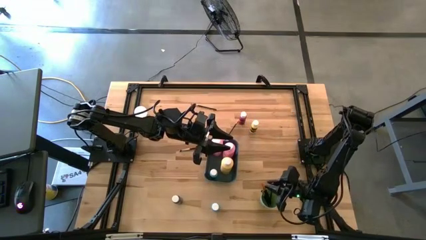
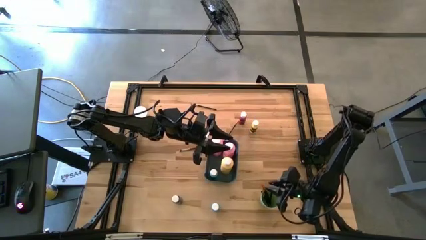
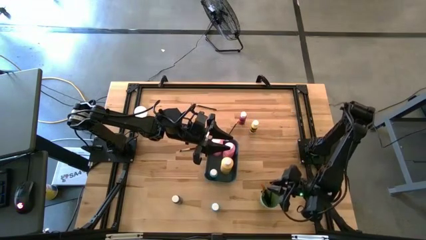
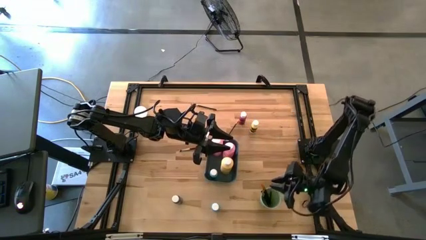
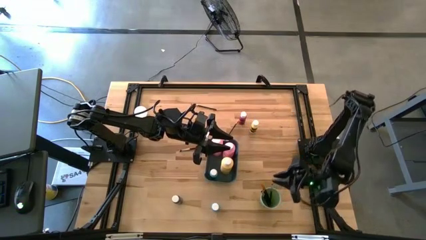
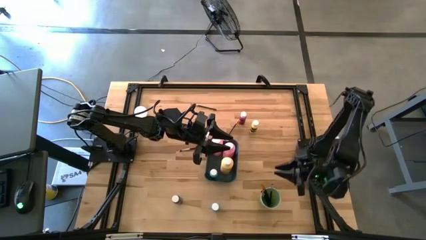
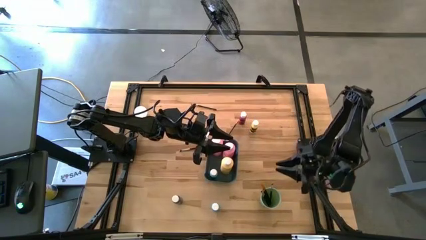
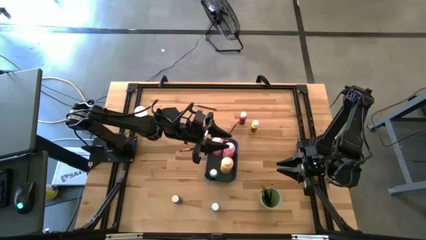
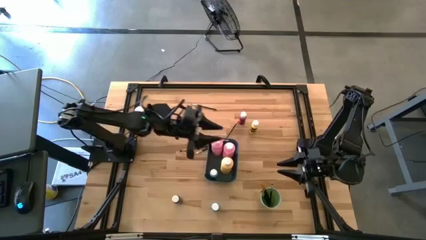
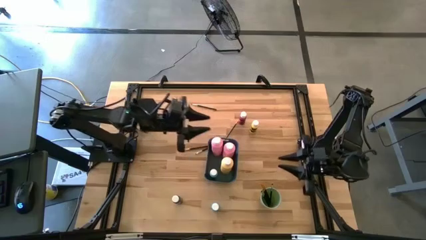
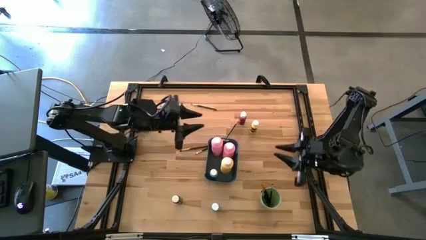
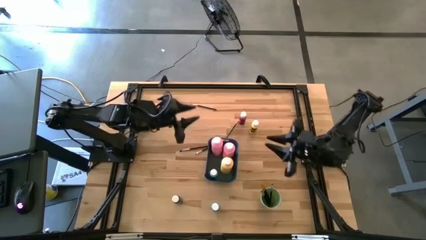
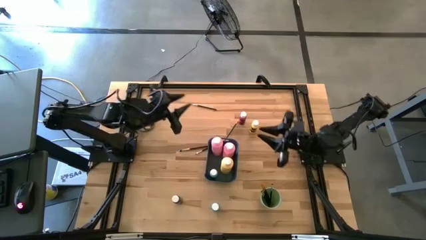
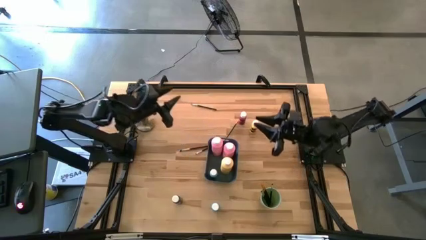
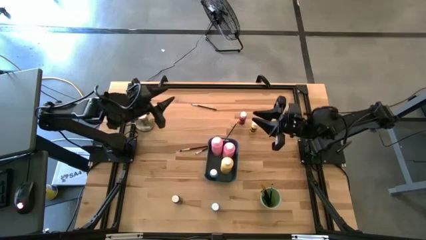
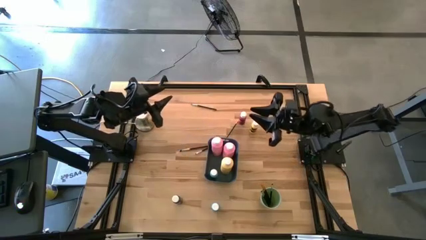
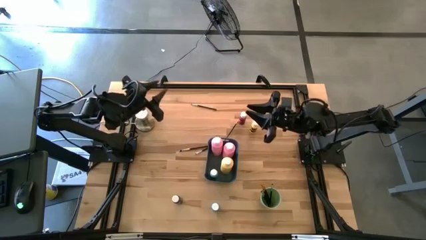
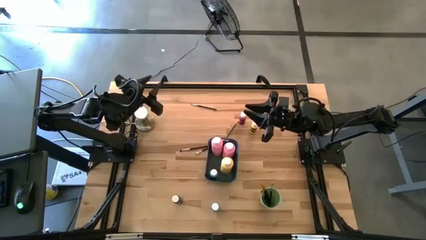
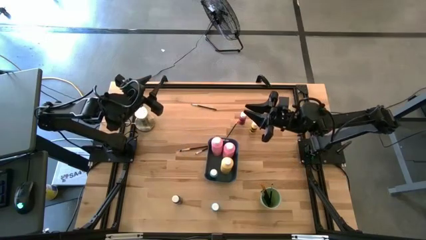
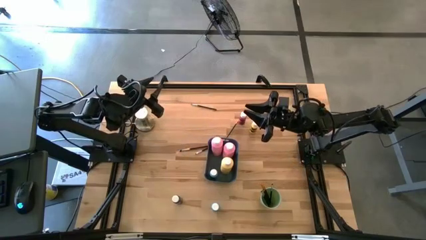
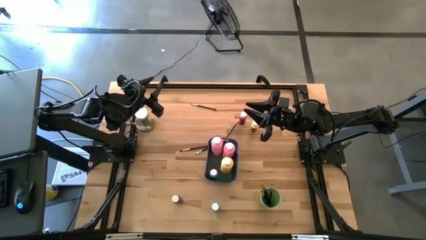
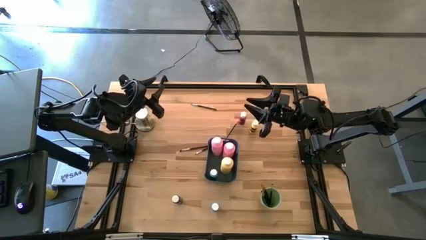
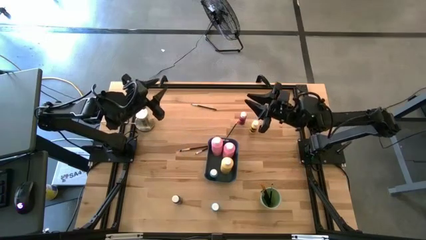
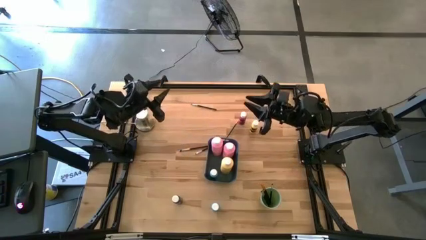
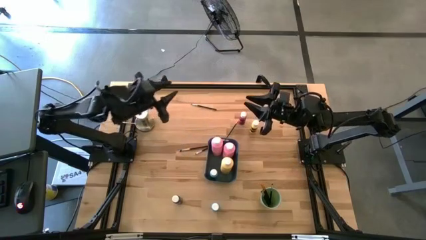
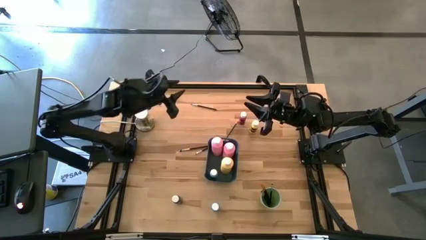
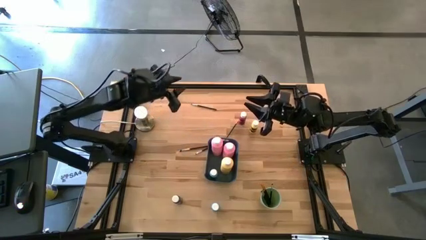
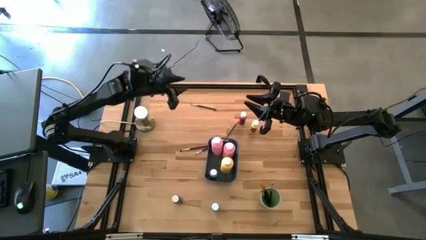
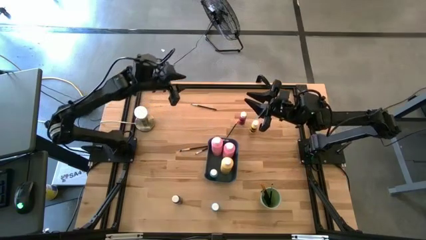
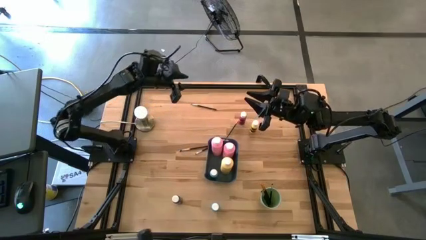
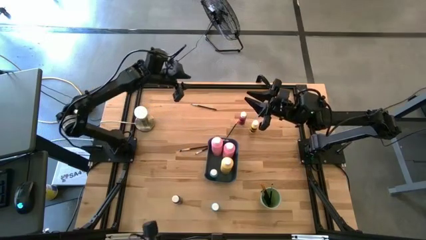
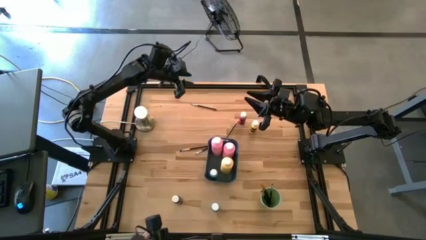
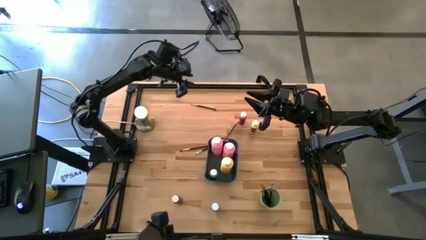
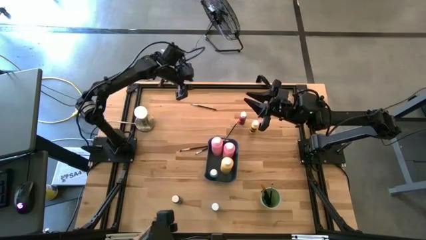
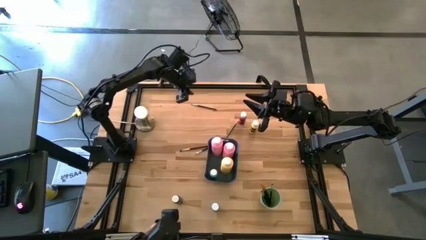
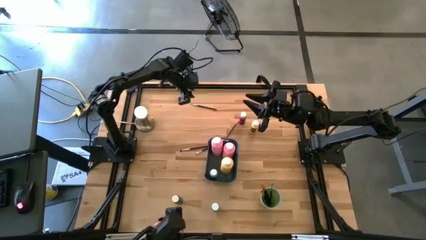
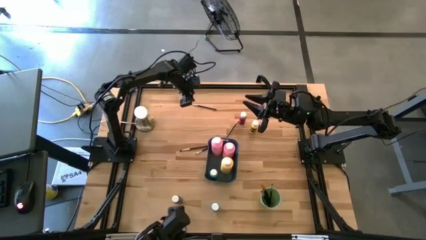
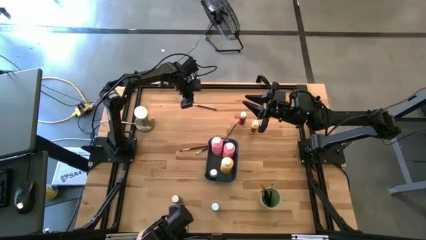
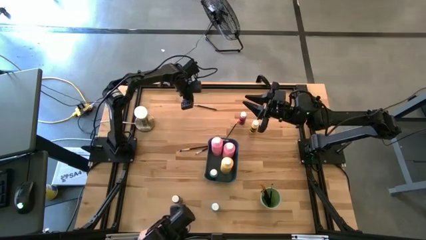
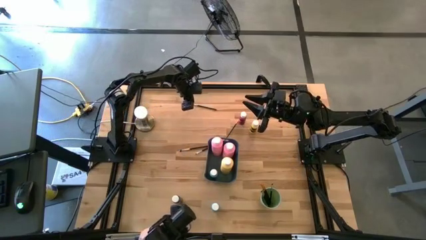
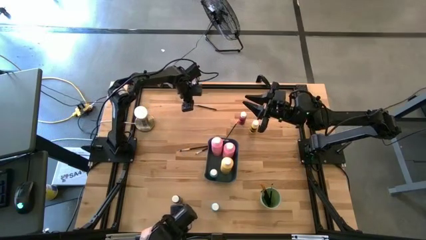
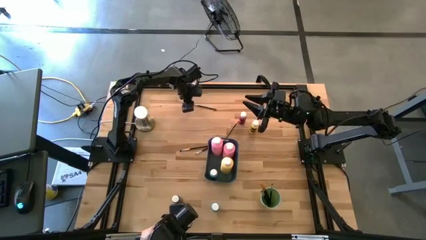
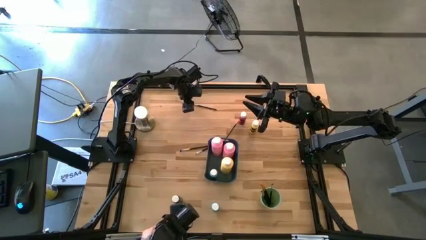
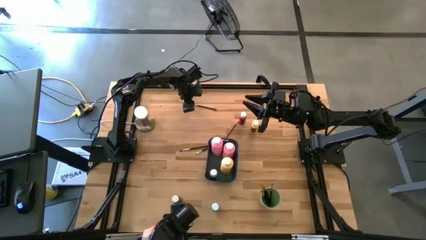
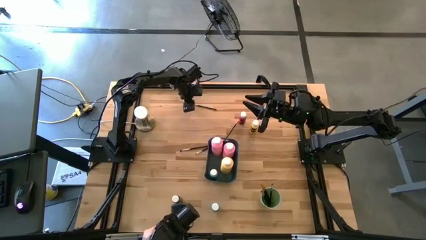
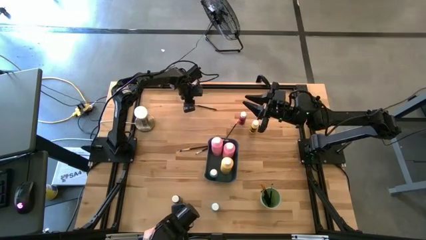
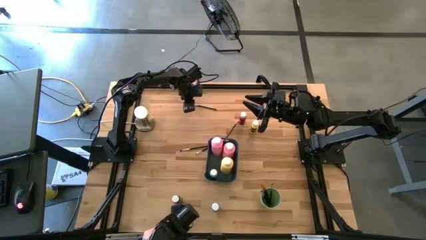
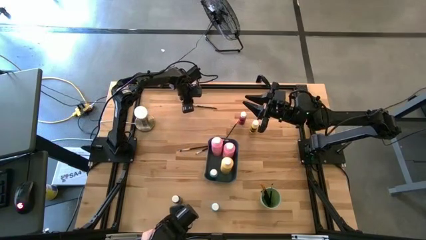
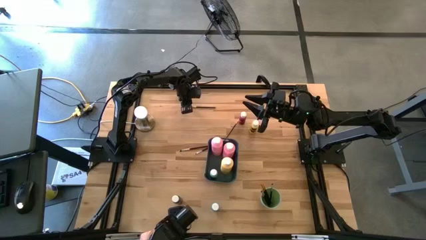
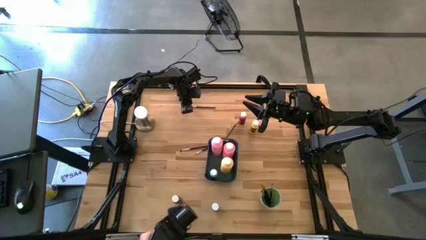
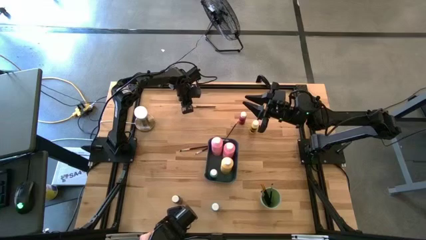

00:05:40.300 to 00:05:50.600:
Task: Pick & Place Paint Supplies
Put the black and silver paint brush into the green cup

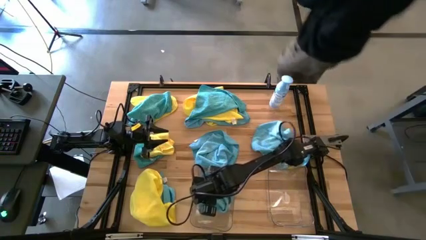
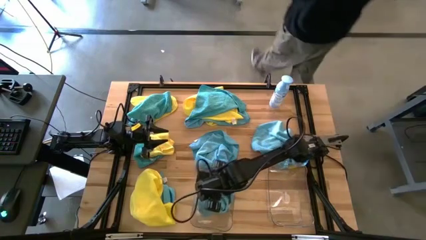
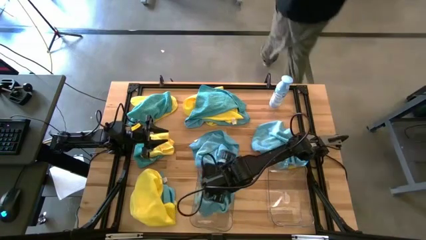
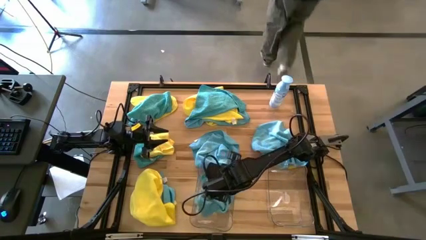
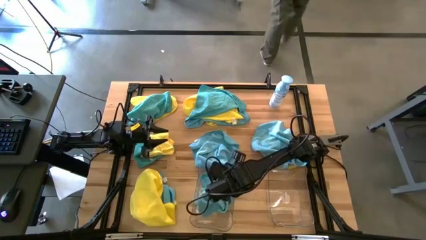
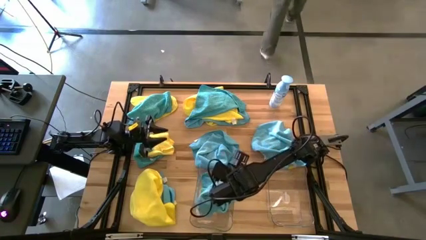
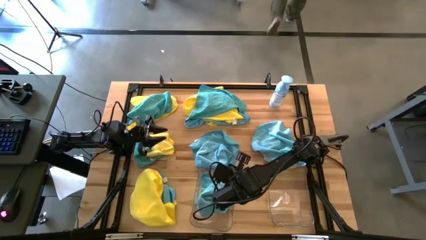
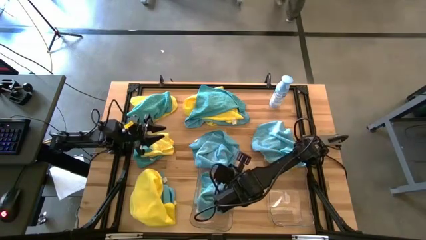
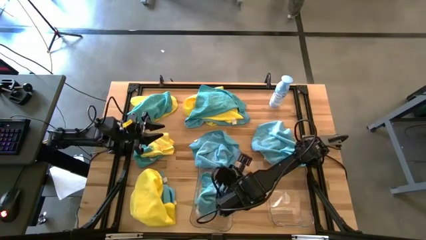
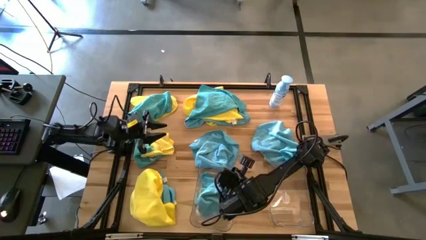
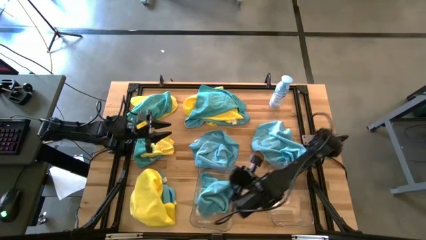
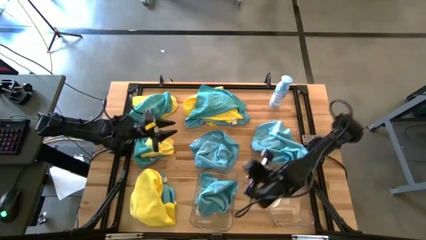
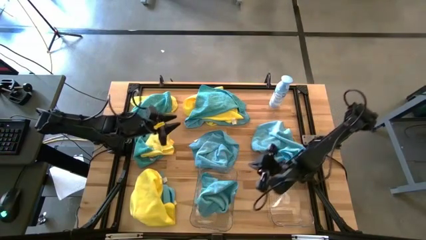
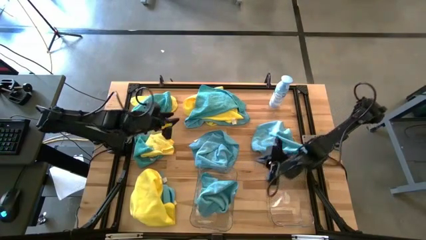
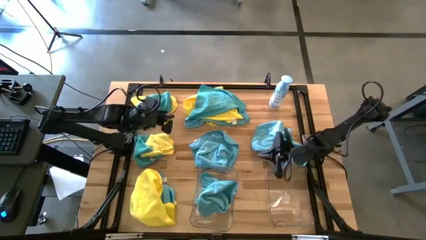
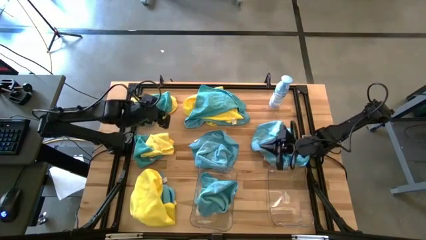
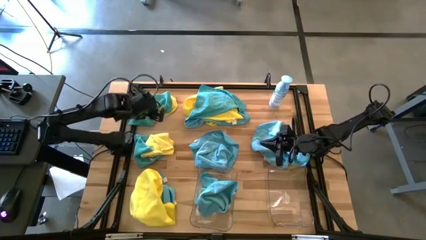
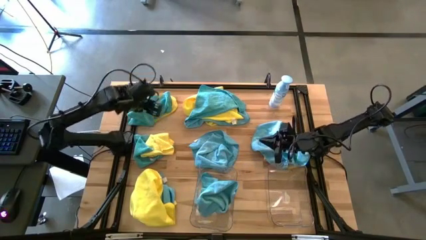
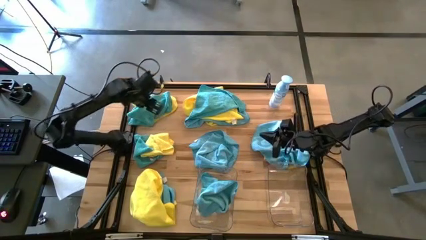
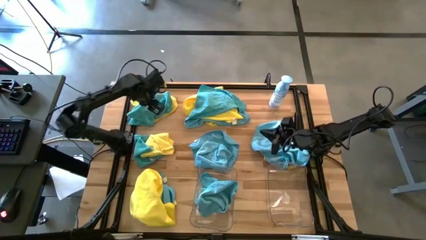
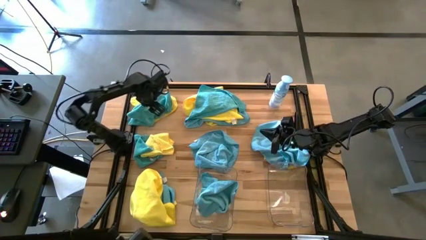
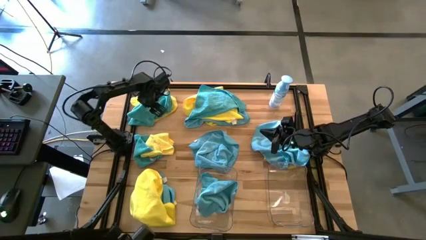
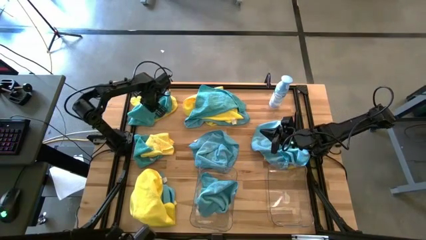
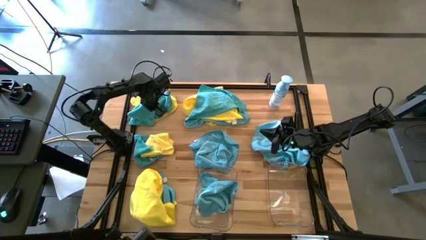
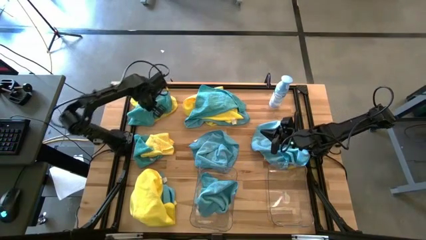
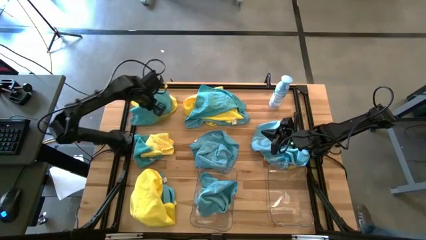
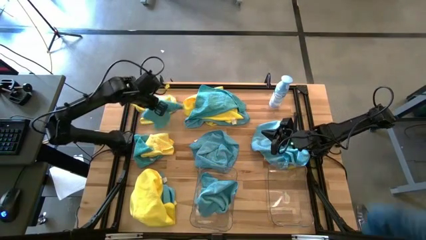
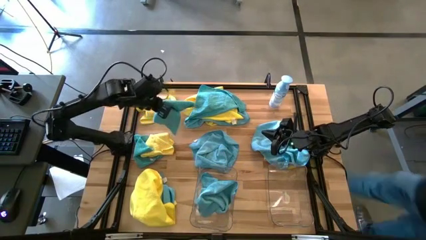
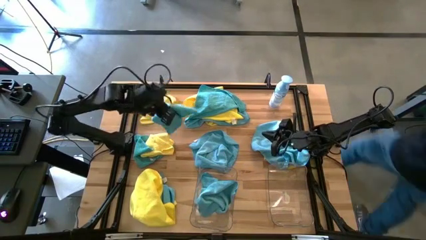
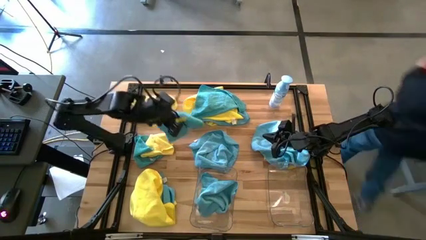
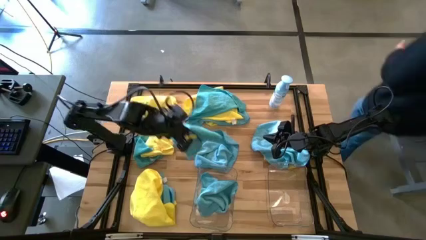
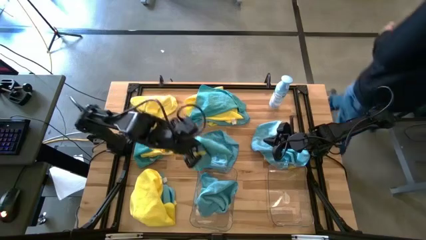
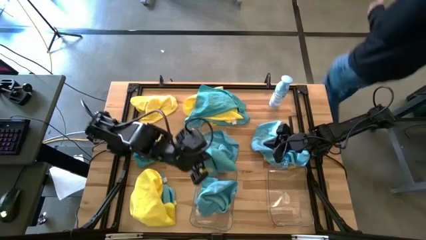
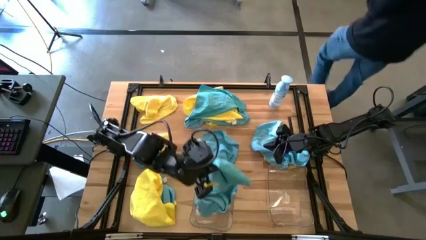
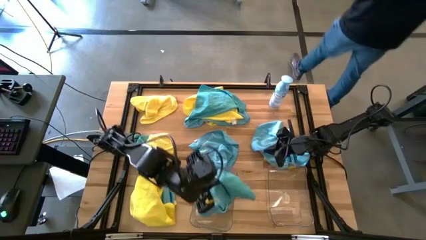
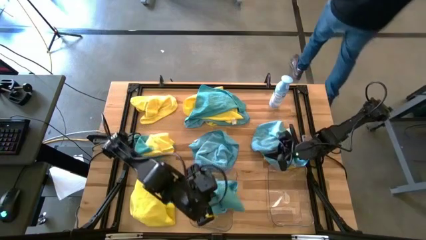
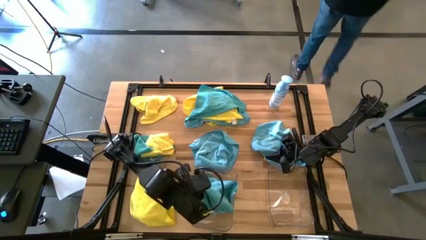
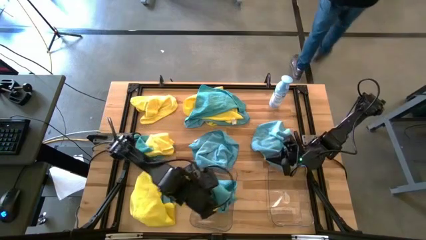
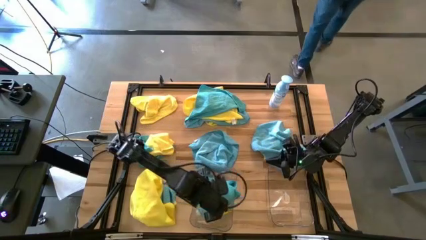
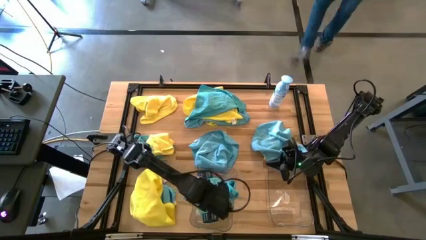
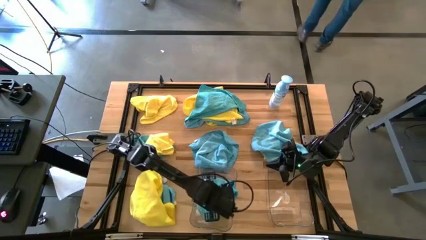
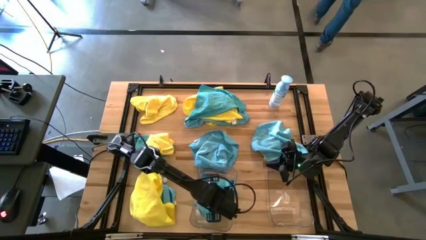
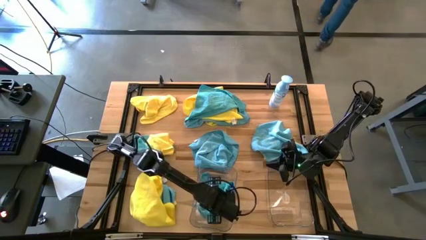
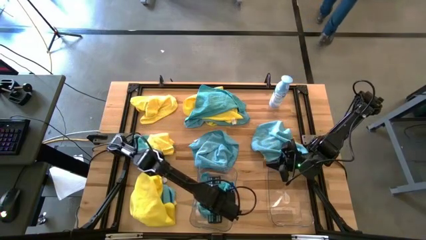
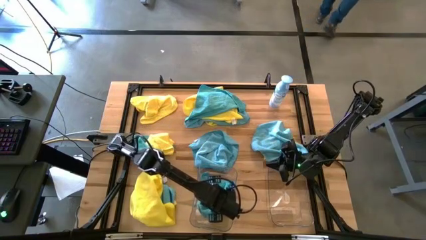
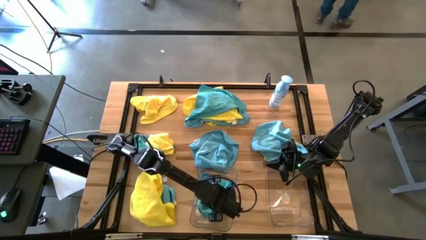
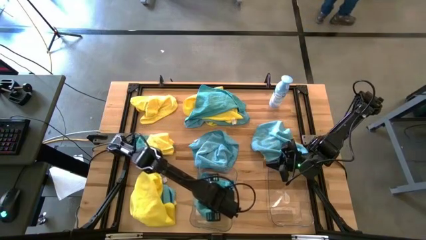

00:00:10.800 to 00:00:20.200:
Task: Sort microfiber towel by color & place in baskets
Put the blue towel into the left transparent bin
